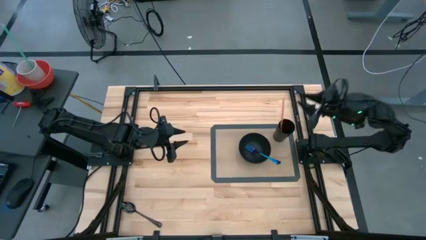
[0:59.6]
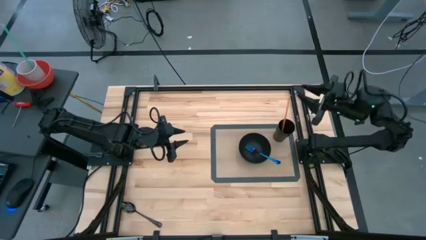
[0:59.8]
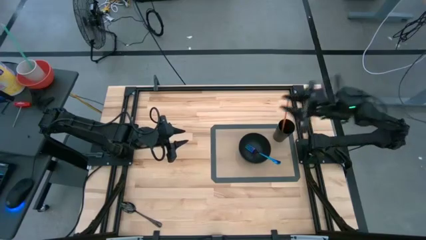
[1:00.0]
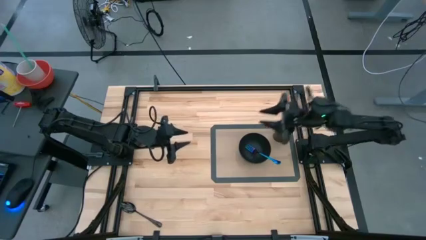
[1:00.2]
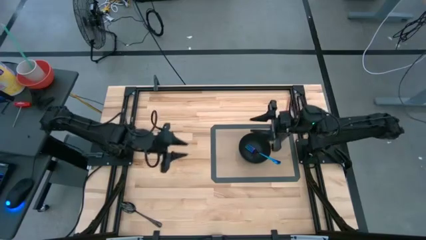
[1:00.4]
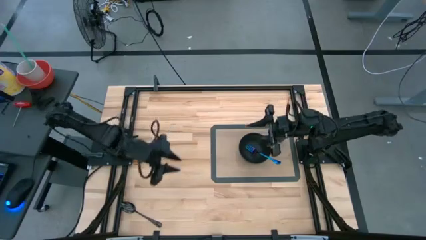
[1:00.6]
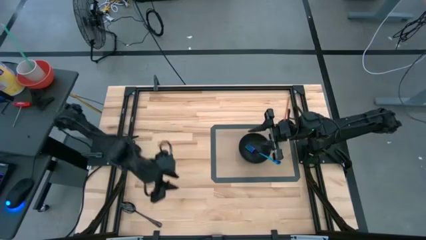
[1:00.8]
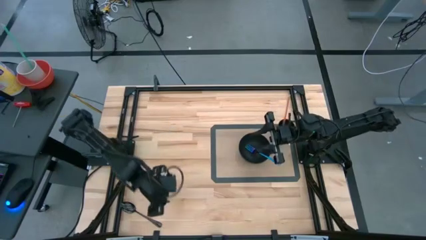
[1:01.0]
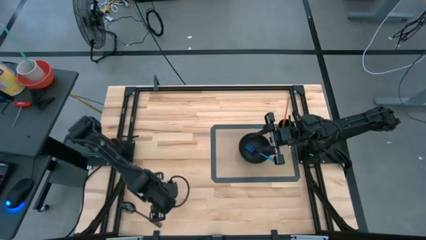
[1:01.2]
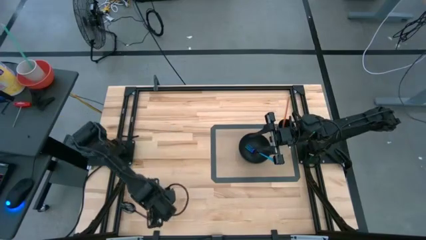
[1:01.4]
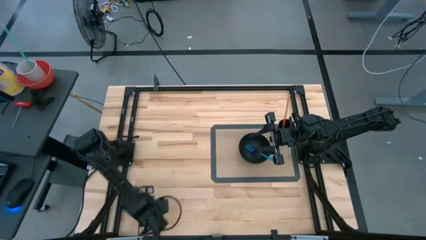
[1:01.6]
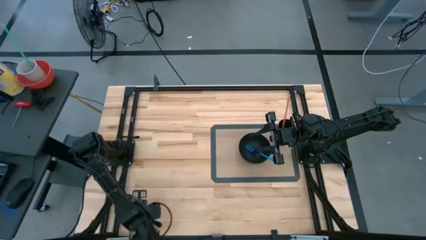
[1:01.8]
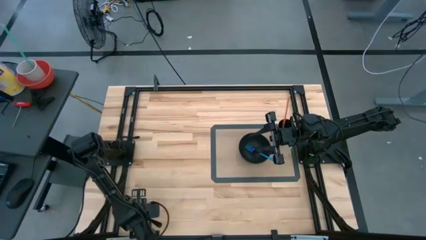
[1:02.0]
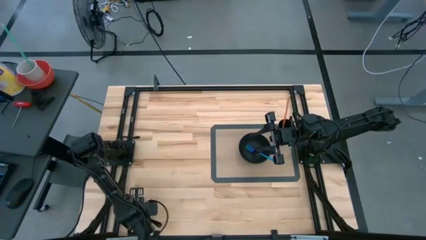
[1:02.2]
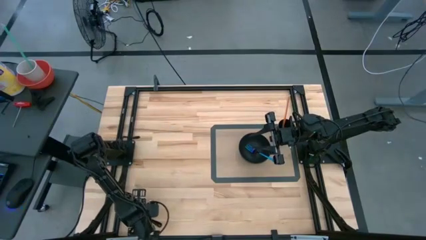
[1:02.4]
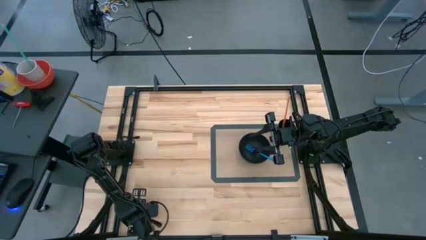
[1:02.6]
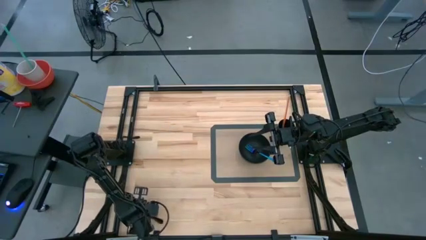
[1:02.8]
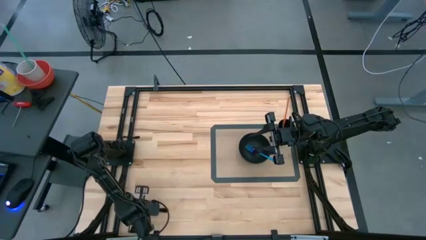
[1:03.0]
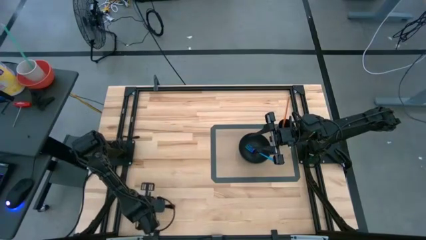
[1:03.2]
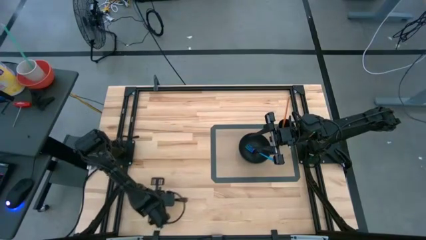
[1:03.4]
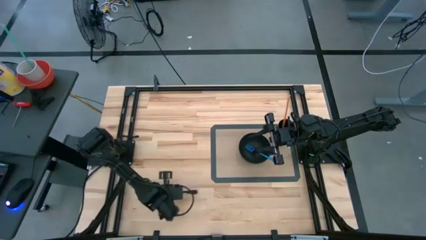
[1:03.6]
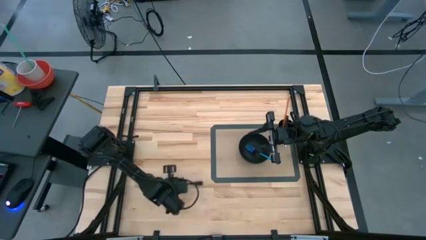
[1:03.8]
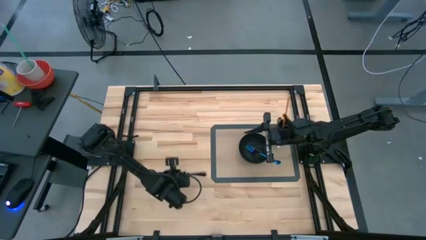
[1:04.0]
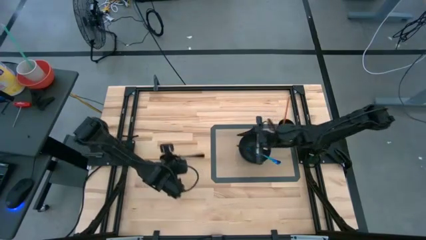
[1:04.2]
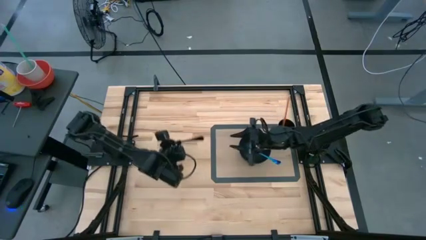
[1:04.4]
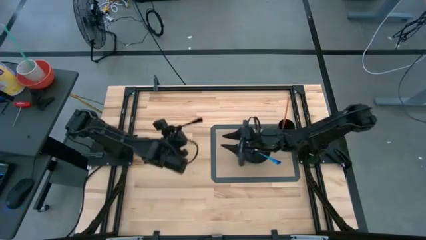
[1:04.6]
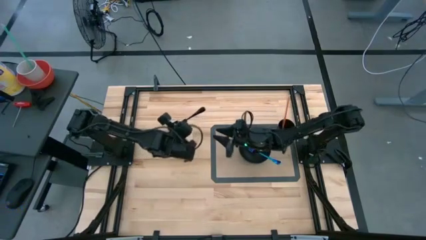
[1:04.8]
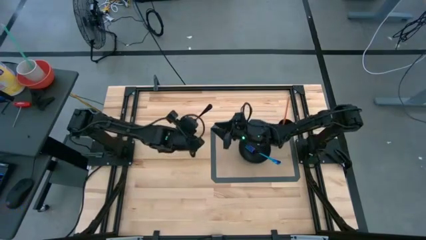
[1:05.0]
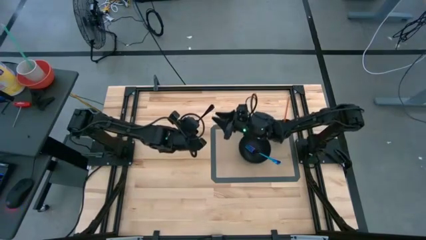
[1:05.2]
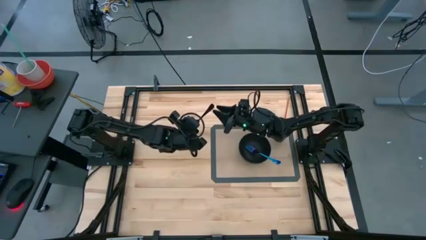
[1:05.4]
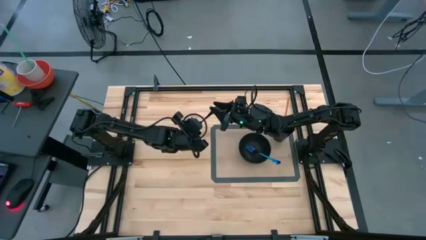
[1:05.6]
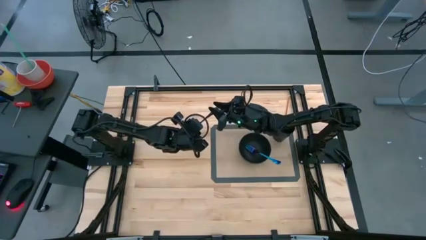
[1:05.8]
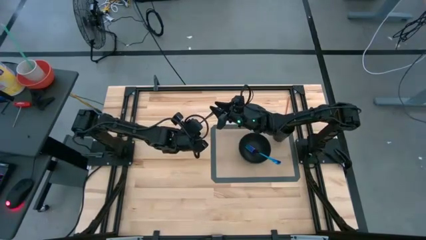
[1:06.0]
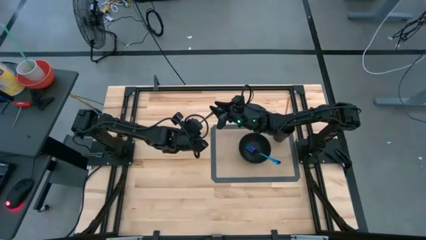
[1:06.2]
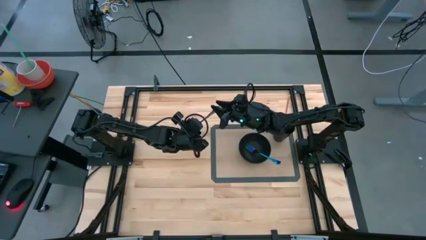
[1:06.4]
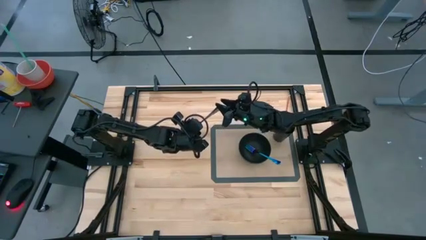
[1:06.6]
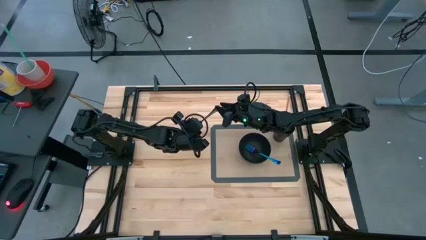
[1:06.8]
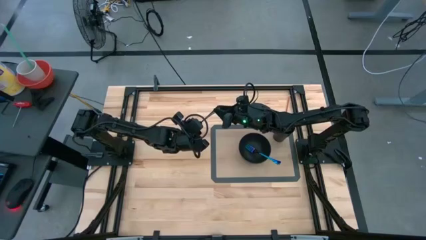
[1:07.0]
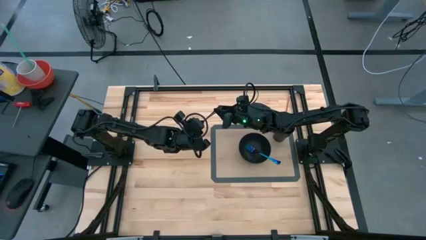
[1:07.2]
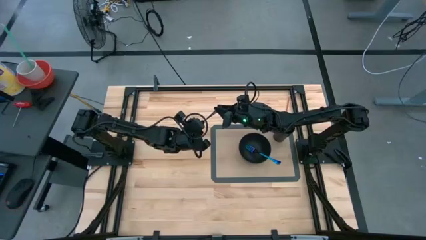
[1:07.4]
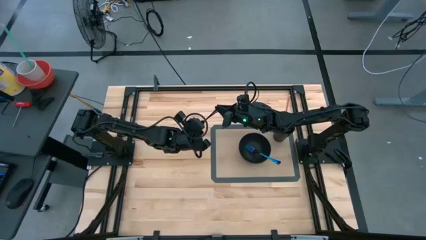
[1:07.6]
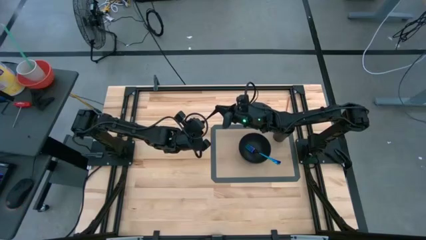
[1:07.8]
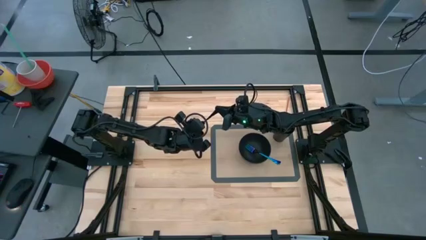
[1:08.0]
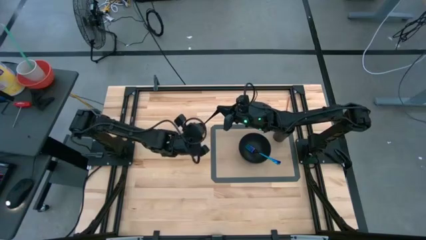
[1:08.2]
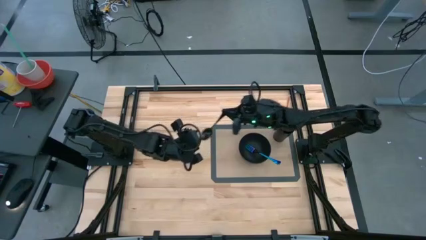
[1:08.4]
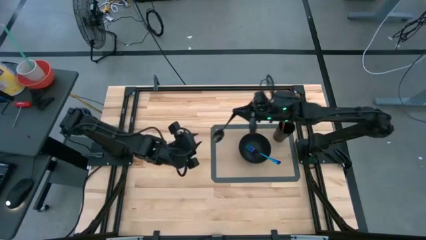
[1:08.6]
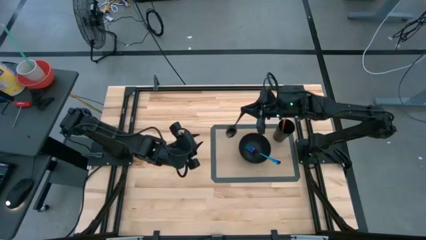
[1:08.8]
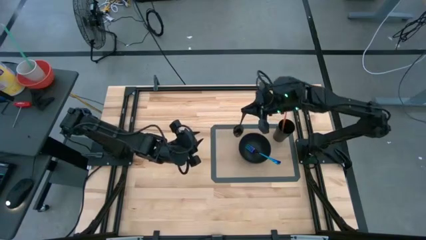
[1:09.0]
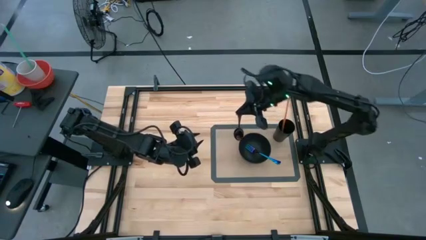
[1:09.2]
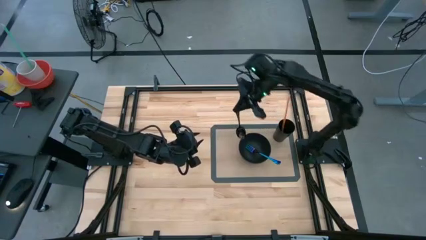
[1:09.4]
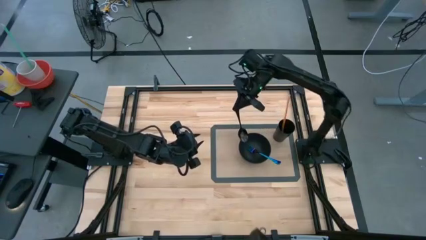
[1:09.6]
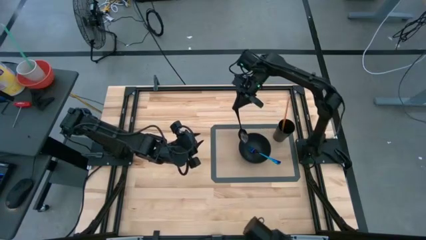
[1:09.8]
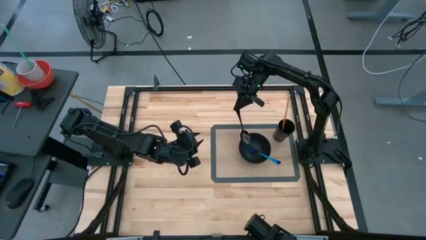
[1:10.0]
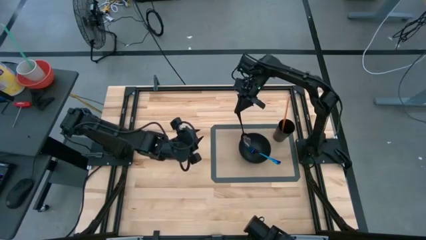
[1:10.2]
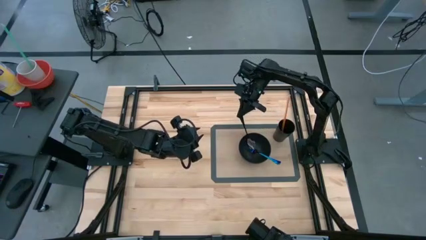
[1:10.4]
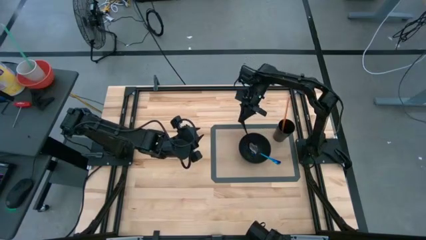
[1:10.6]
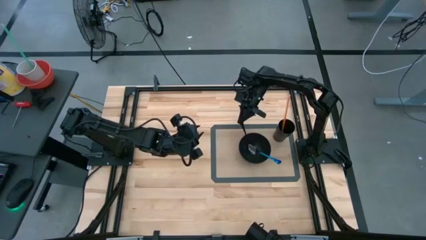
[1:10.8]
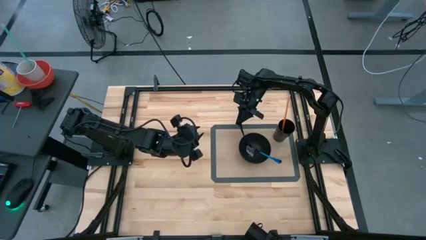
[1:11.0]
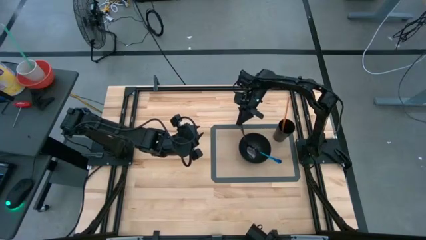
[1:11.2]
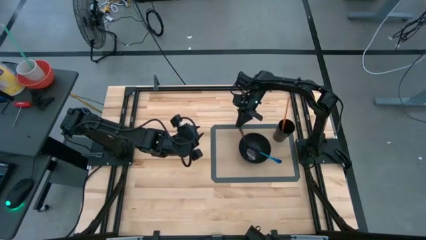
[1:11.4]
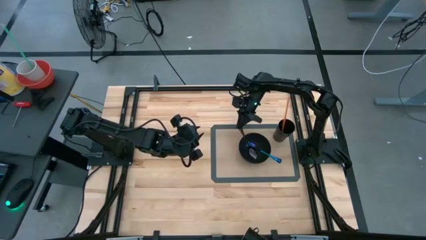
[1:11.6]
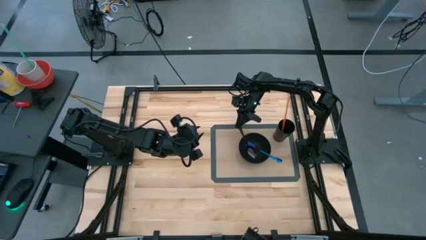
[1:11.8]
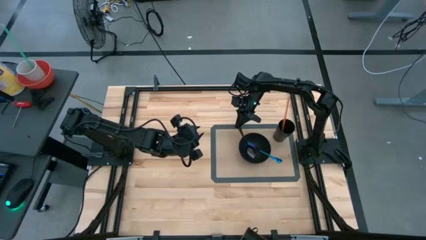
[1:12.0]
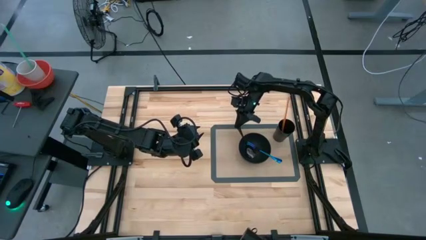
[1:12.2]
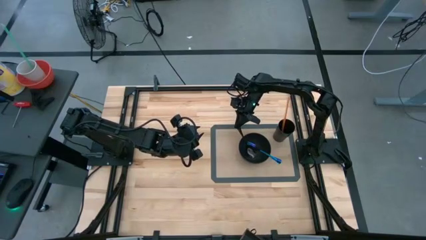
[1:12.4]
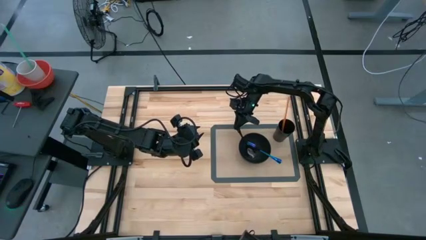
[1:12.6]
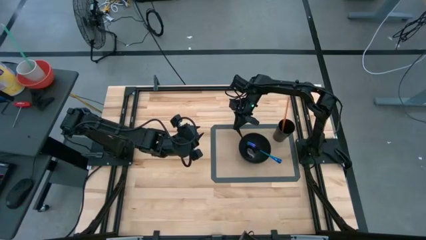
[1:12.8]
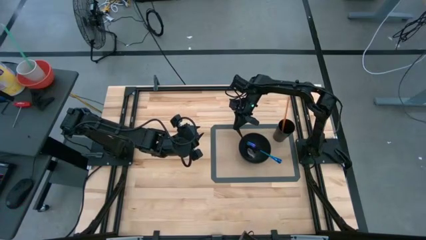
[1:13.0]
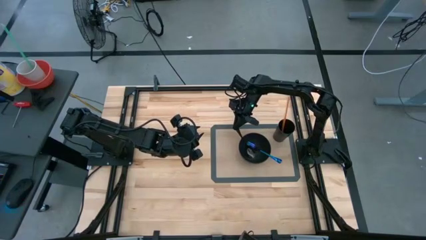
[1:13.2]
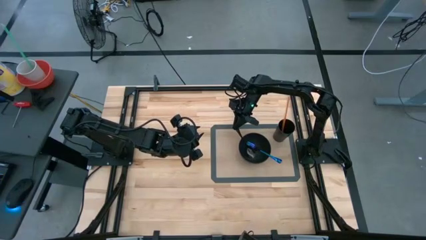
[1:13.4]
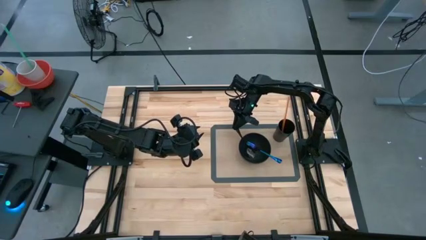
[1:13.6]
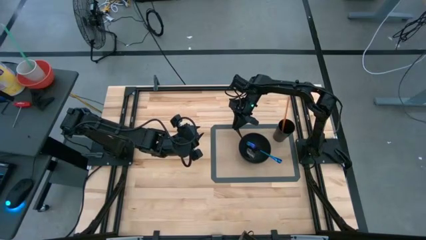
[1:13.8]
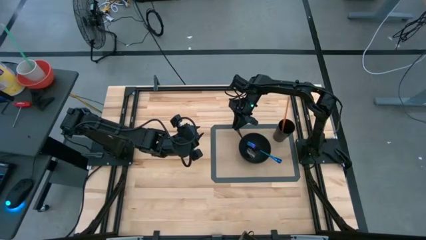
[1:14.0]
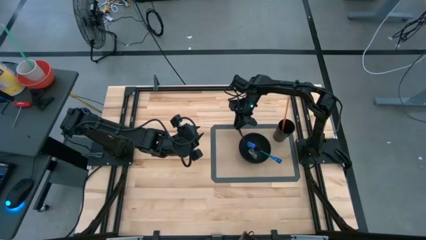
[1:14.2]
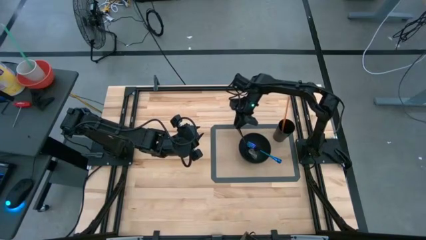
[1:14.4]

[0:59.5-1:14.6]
Task: Pick & Place Utensil
Put the black spoon into the black bowl
